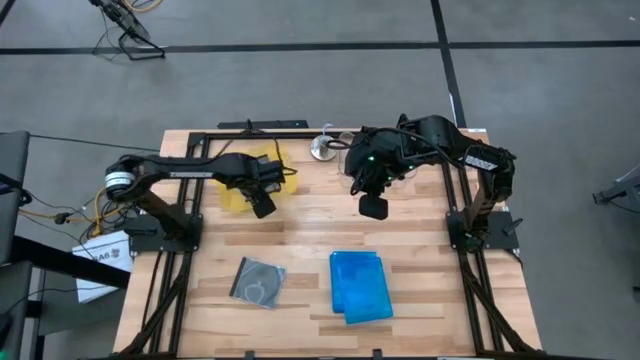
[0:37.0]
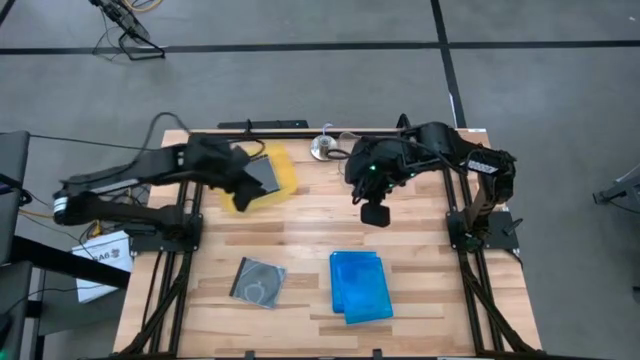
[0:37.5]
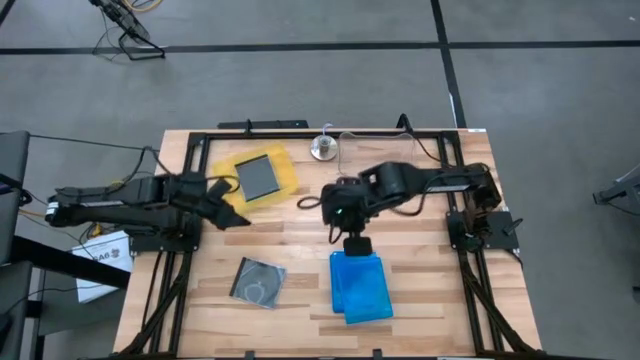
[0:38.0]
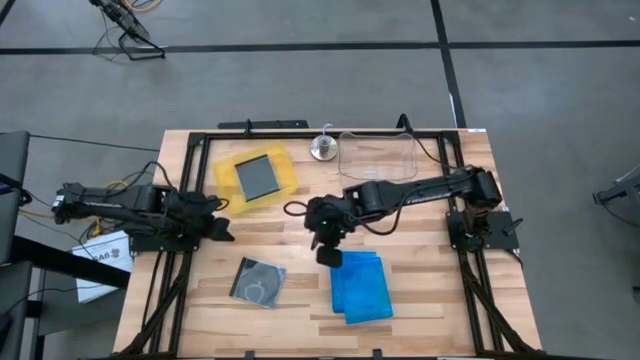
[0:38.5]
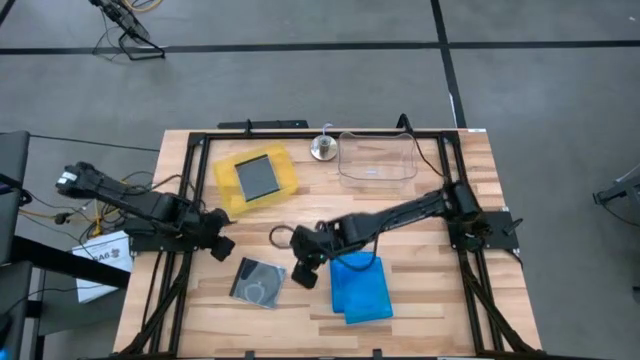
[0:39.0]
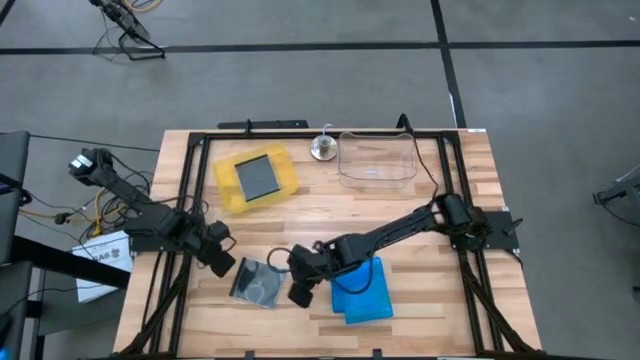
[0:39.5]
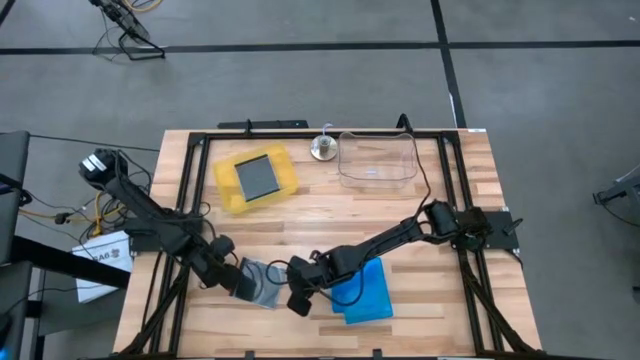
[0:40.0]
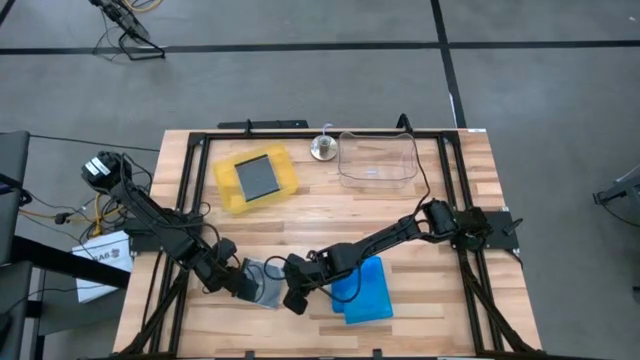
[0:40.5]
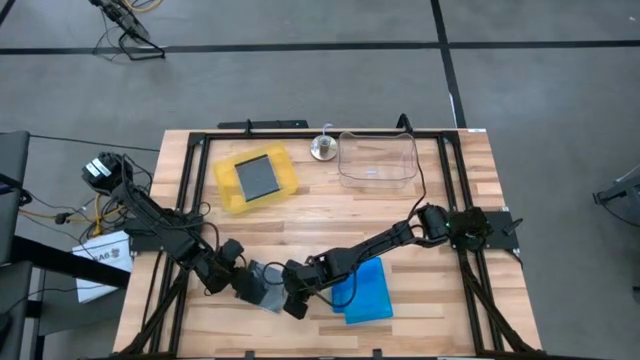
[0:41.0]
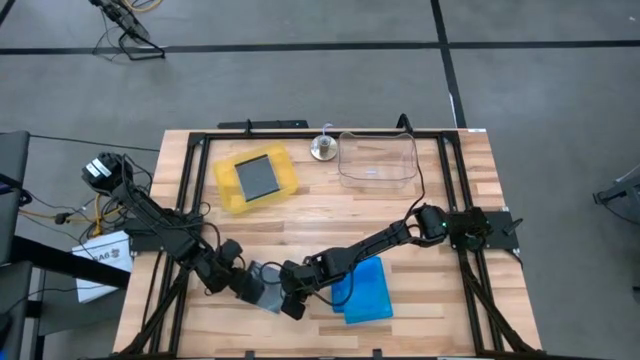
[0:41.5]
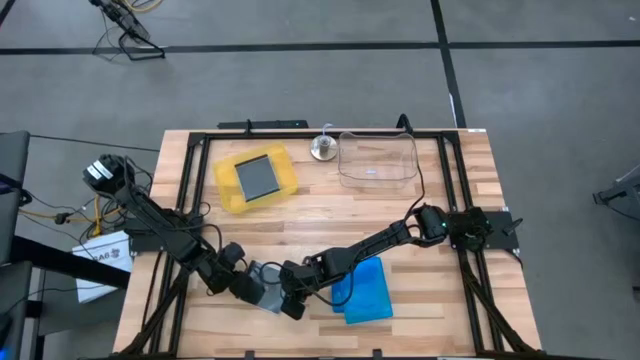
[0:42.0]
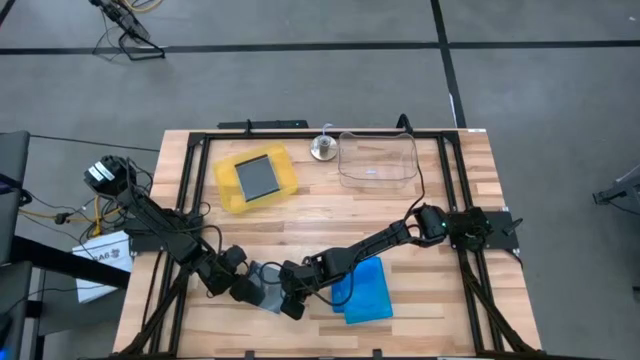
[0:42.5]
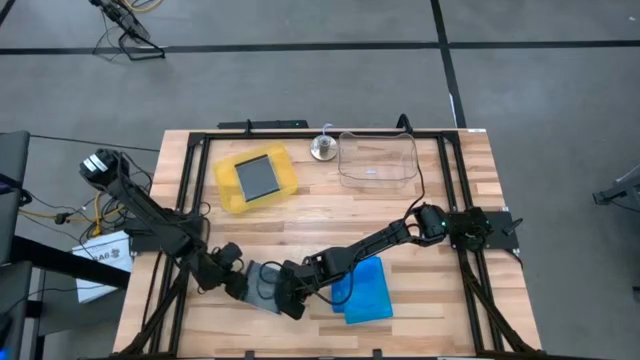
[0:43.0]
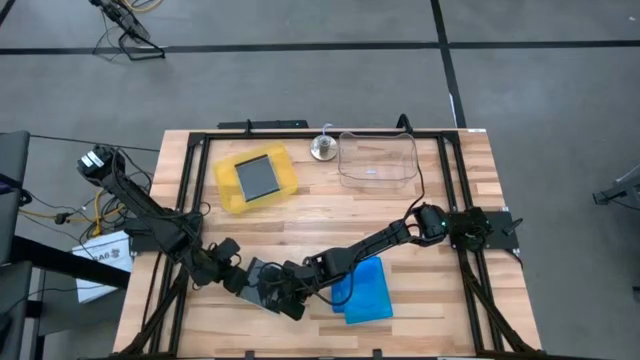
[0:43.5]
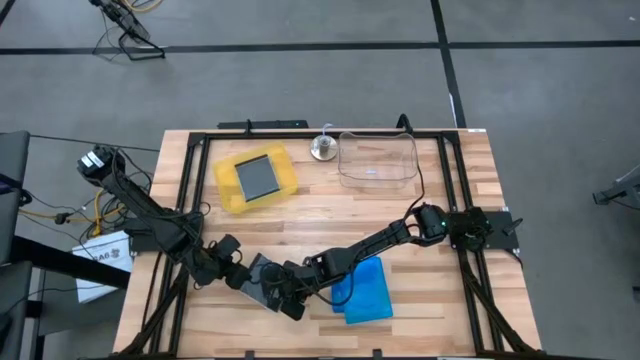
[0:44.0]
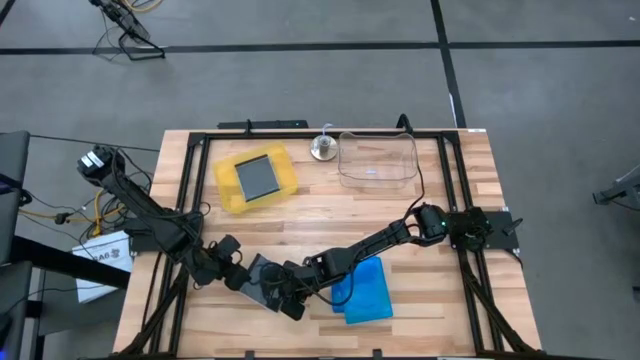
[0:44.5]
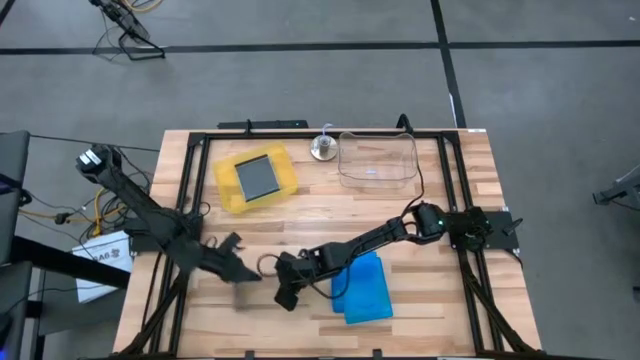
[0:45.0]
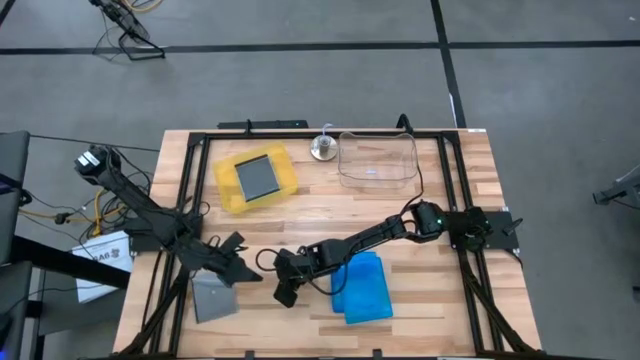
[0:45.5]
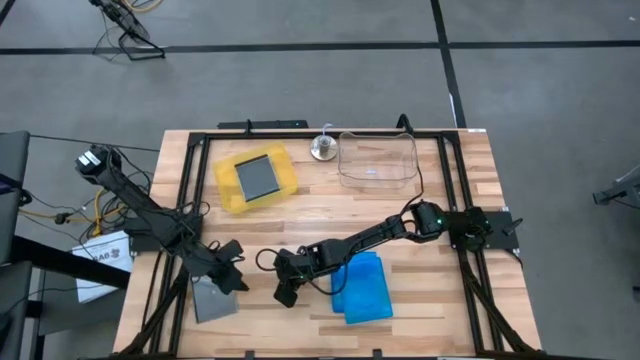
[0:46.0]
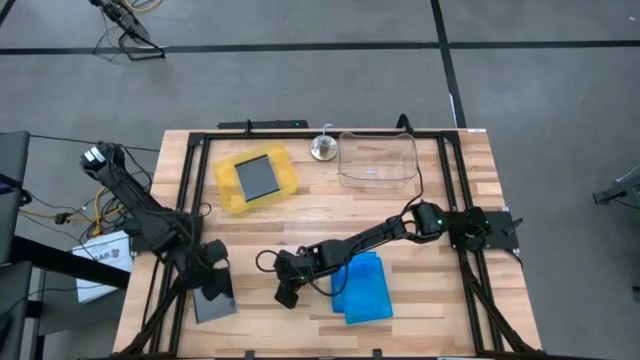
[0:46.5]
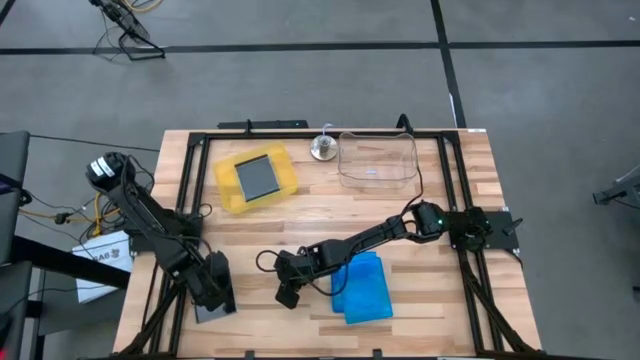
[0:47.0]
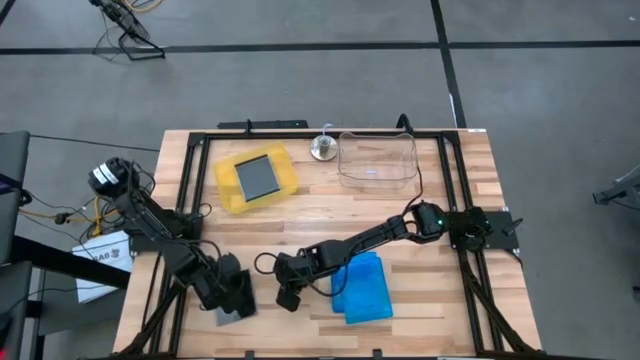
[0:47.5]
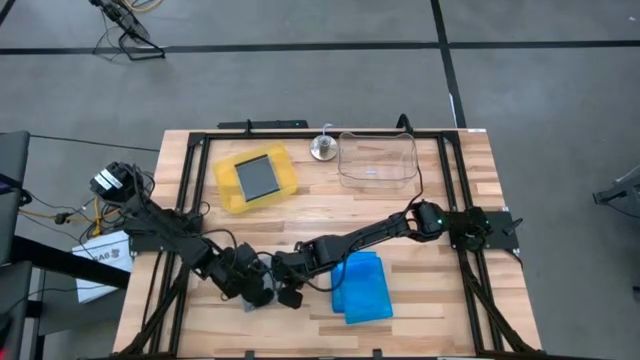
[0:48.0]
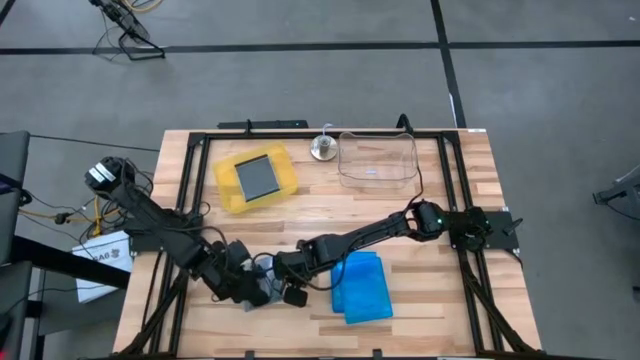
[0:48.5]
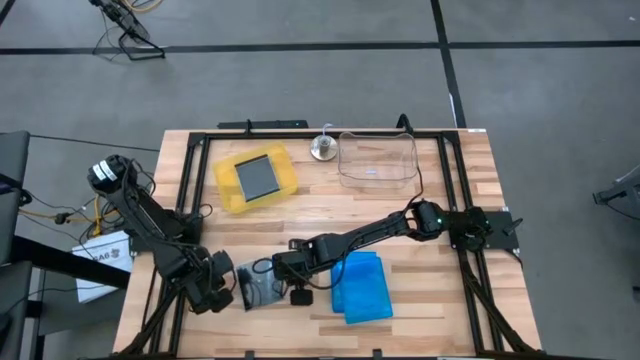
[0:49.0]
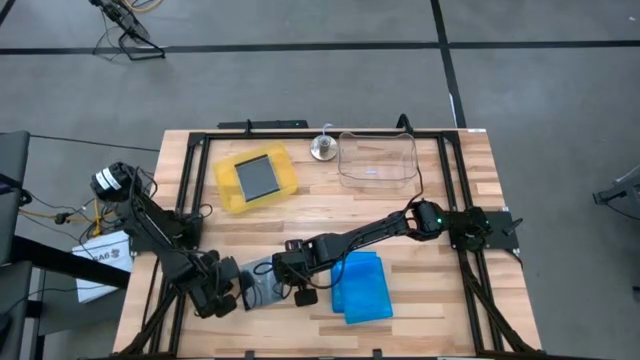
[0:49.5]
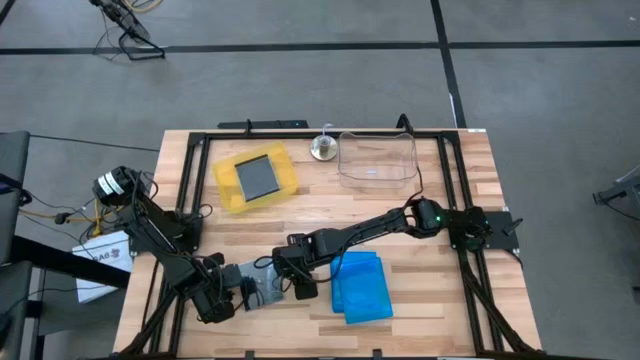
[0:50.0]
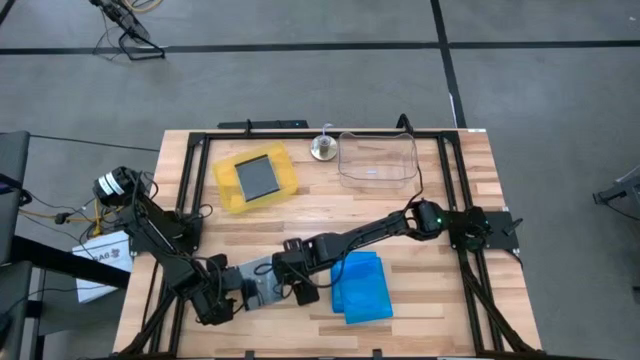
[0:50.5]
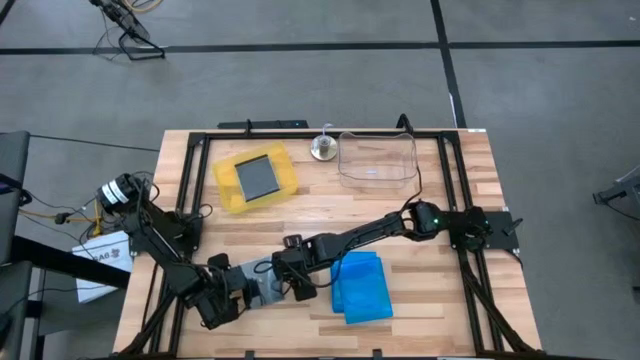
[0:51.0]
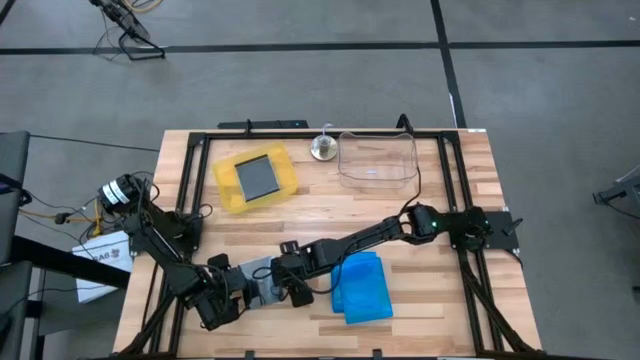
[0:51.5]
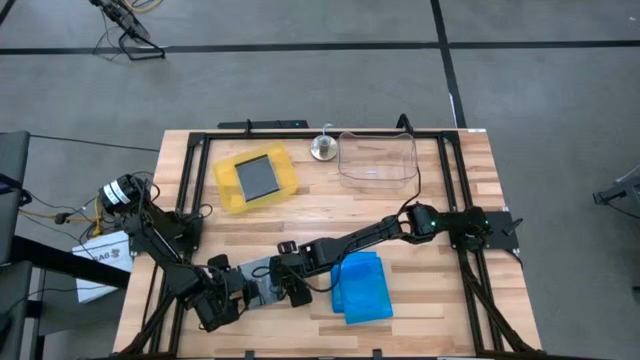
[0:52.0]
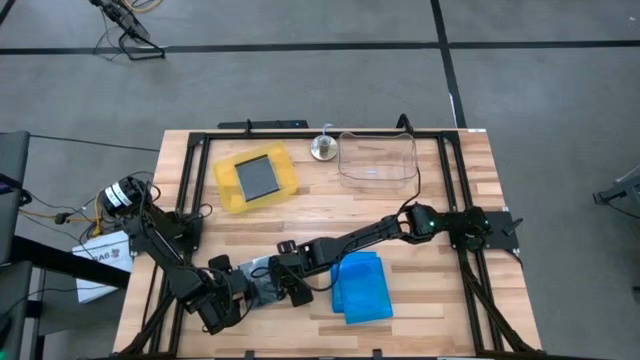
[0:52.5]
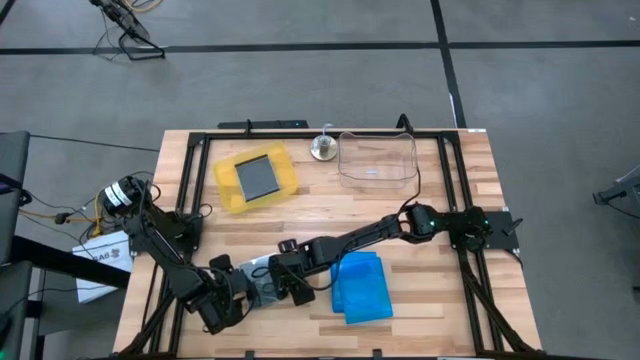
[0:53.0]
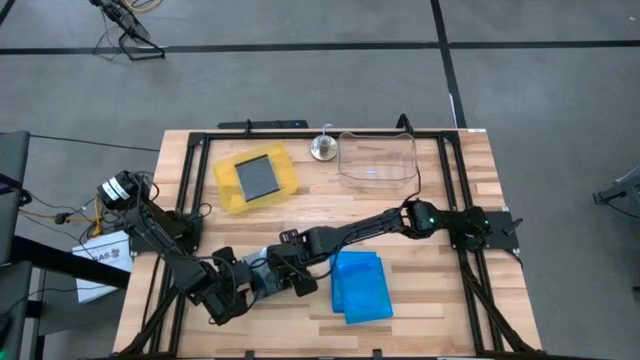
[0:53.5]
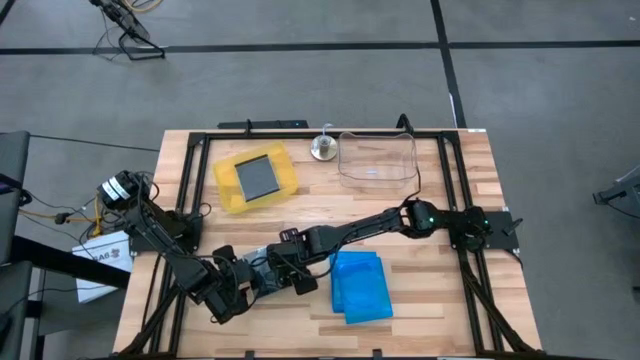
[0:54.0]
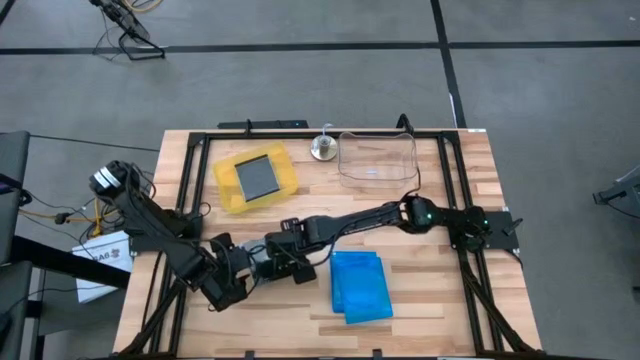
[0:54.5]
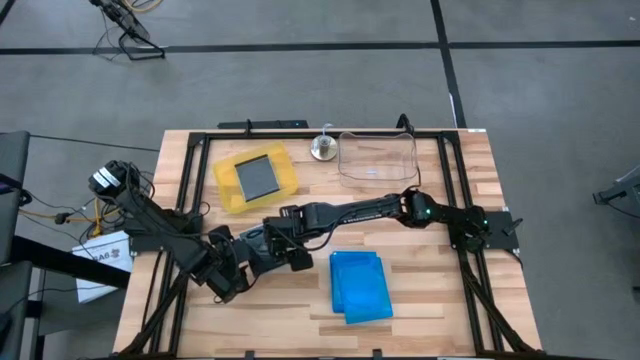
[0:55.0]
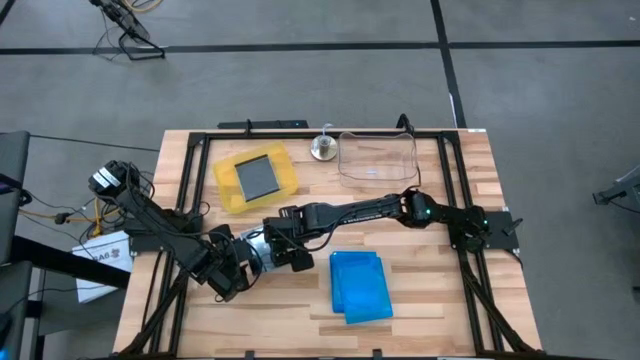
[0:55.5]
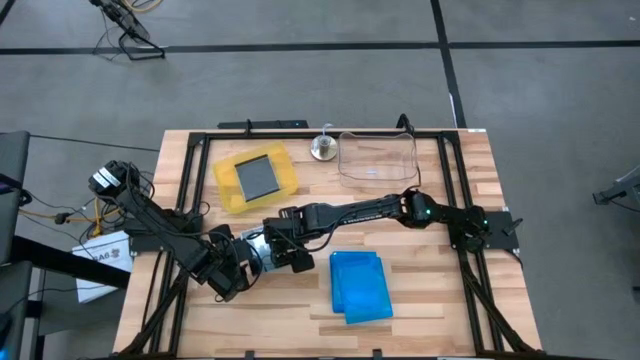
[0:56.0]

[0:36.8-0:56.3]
Task: Pick & place jewel cases by type
Put the black CD case into the yellow bin
